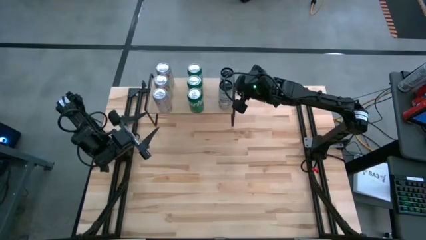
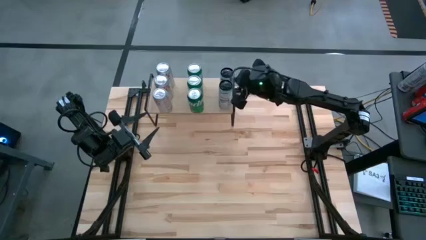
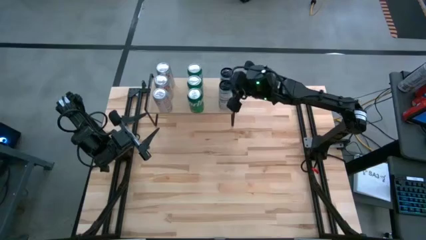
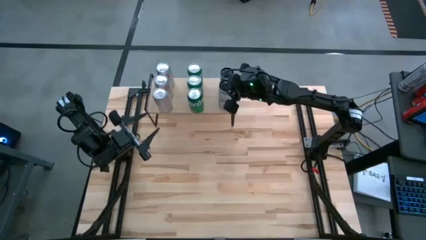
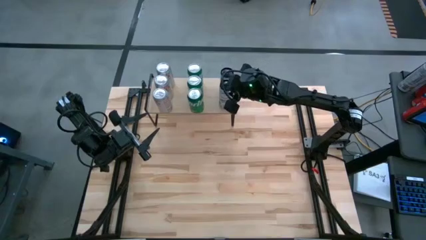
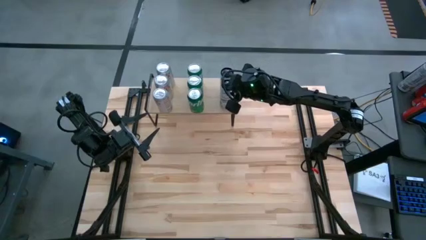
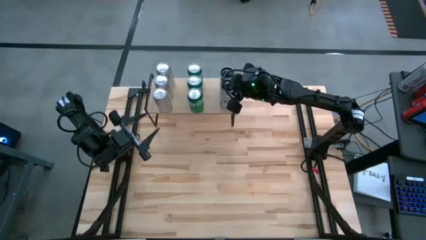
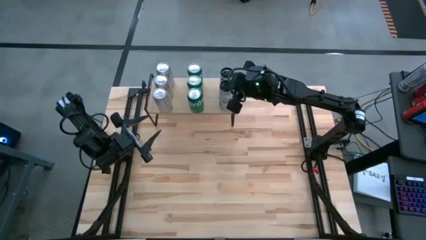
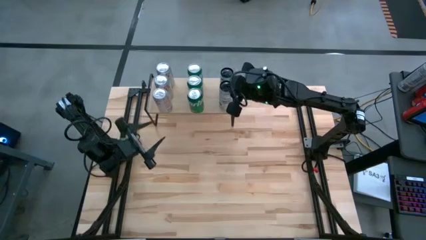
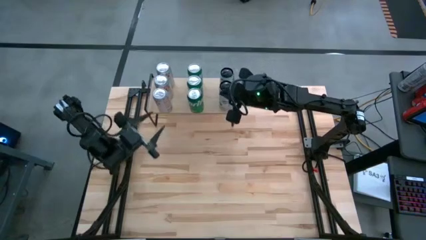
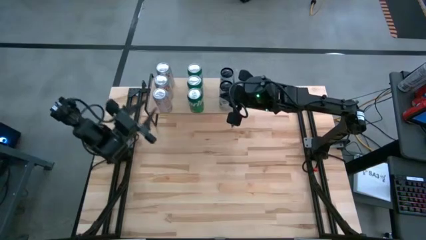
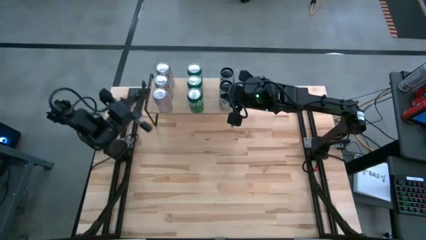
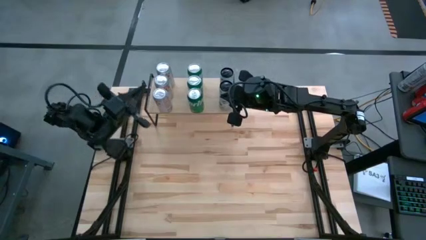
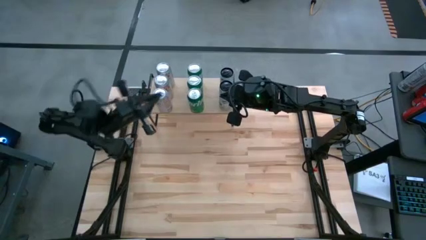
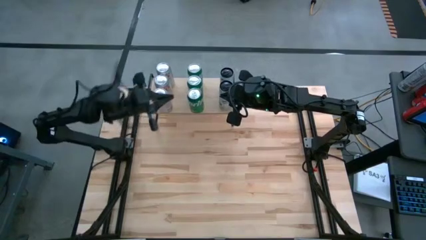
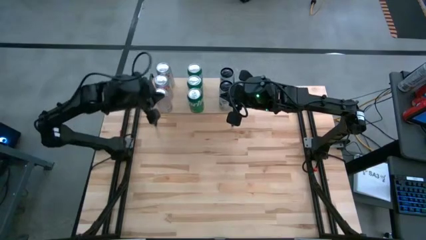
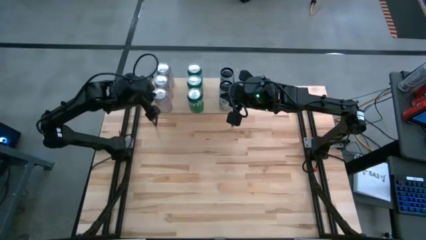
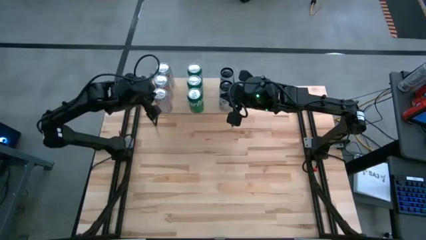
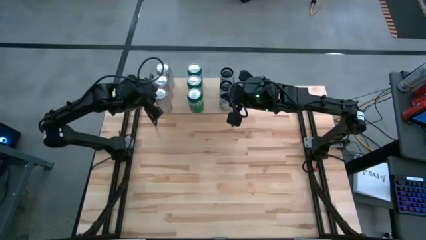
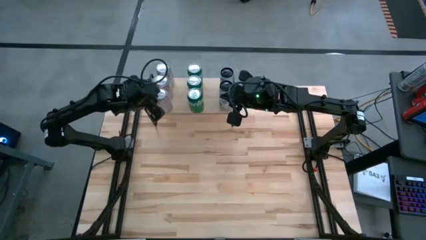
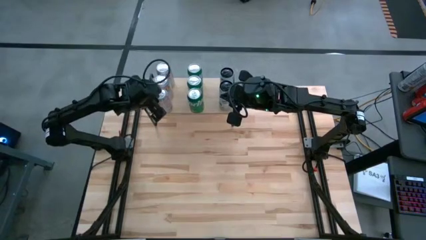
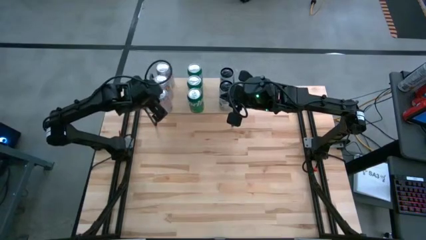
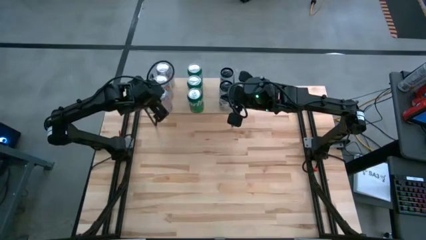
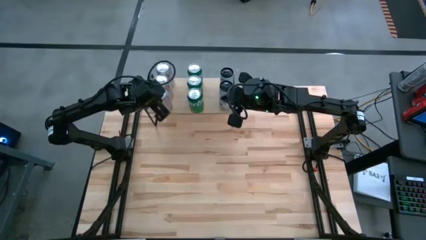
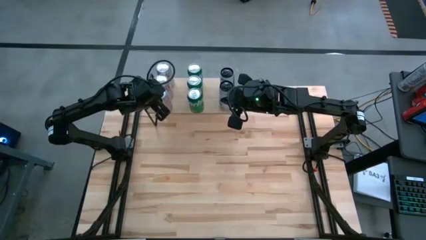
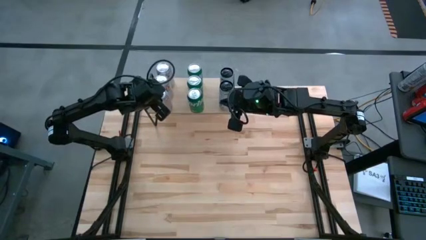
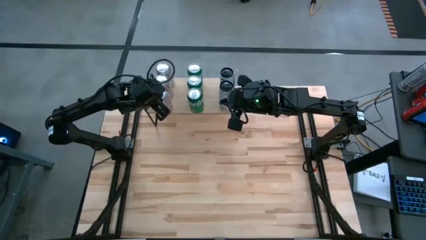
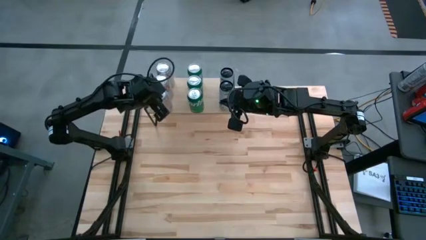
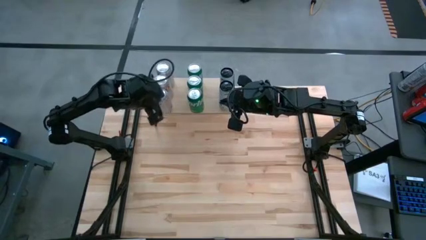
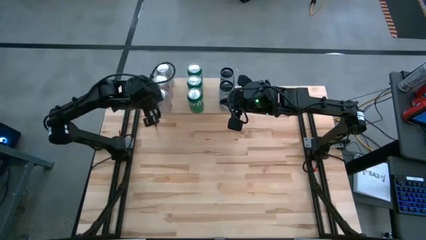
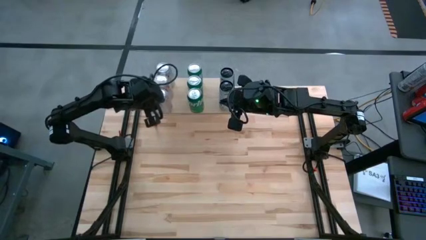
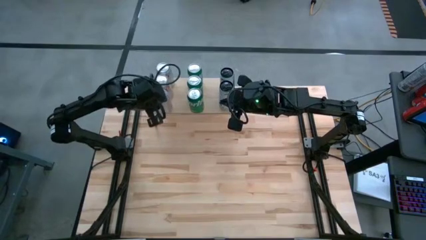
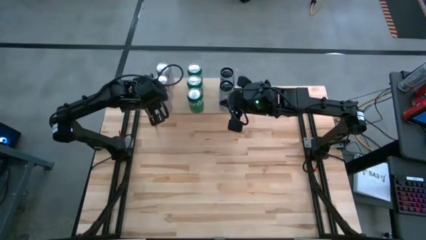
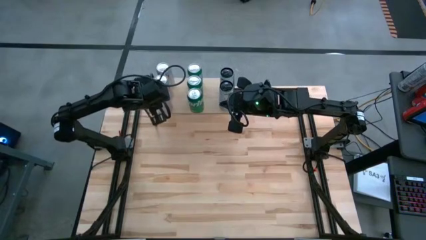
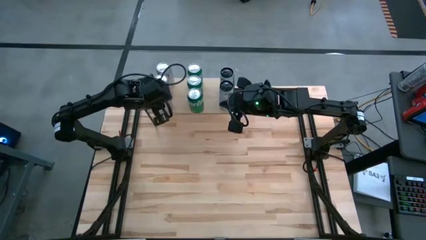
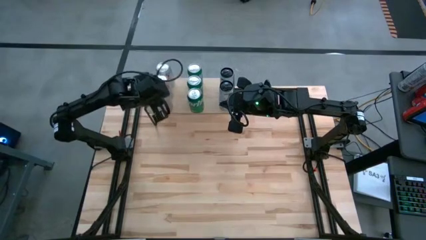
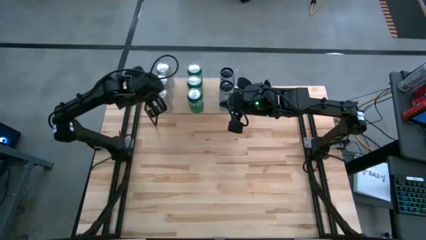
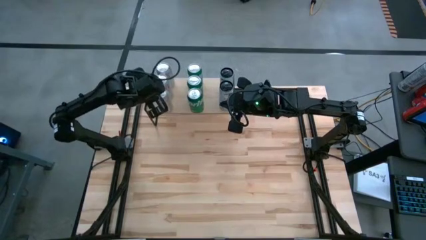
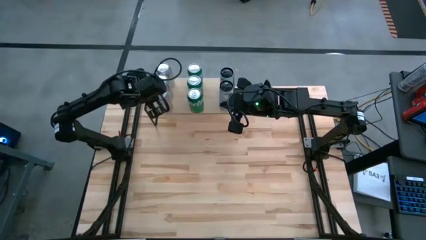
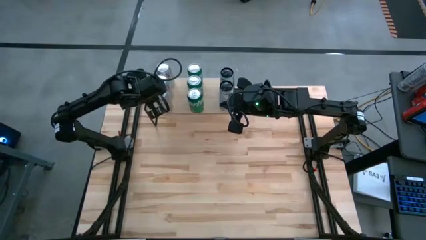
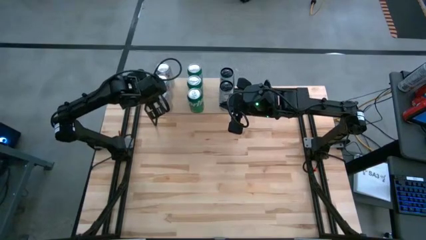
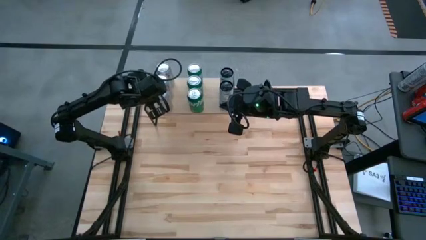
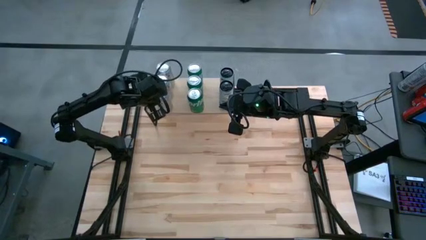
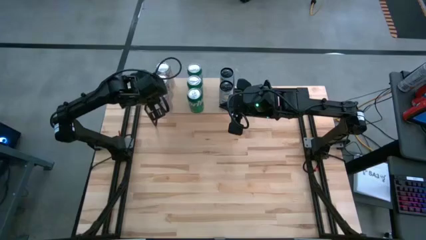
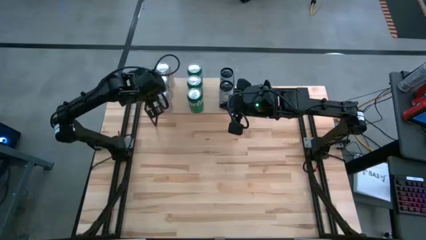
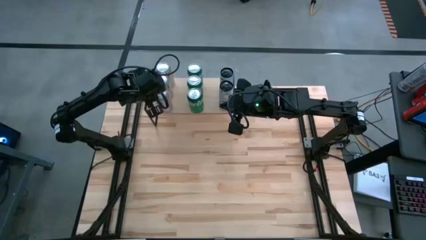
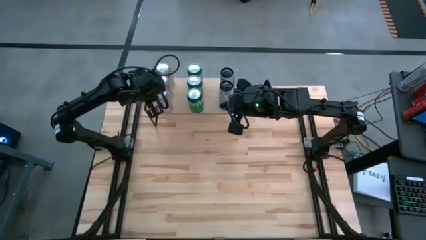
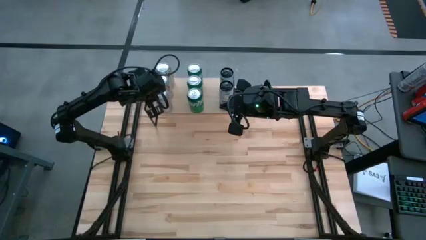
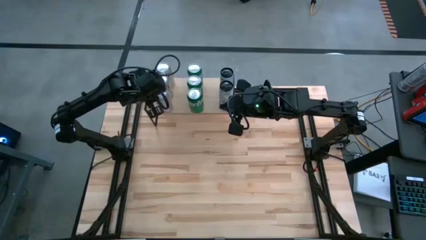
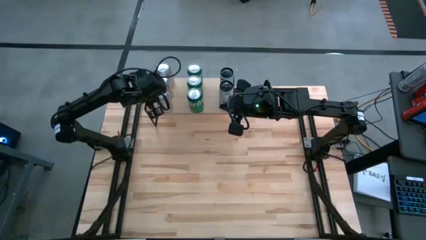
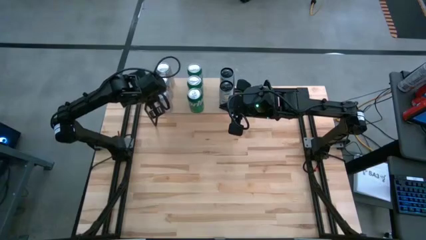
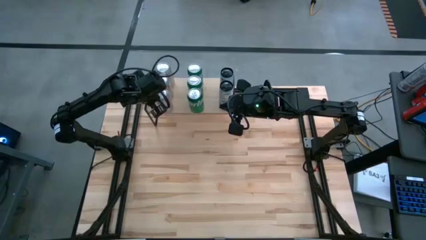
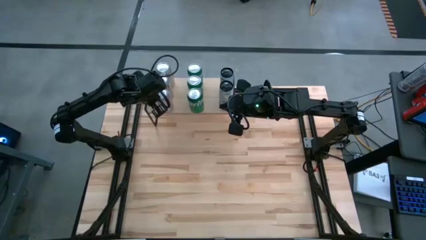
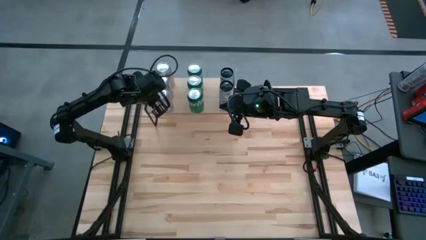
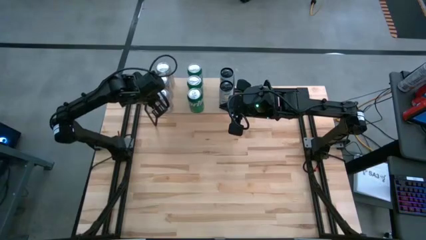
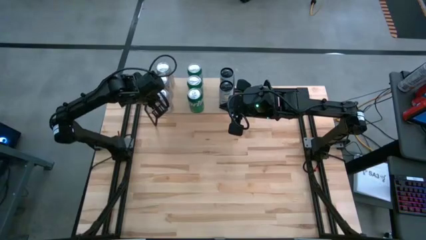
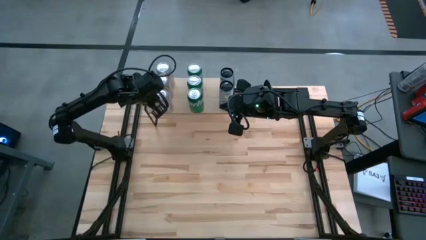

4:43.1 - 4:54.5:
Task: Place canned beverage on shelf
Adjust the soda cans on the shelf

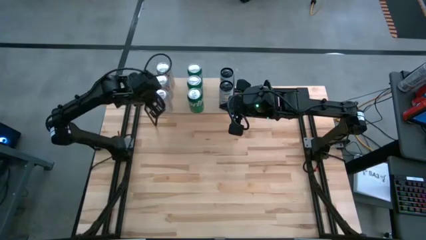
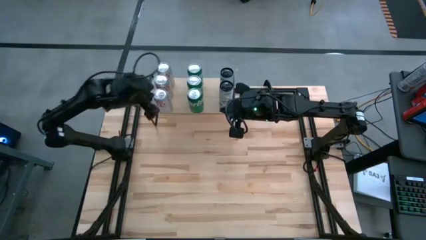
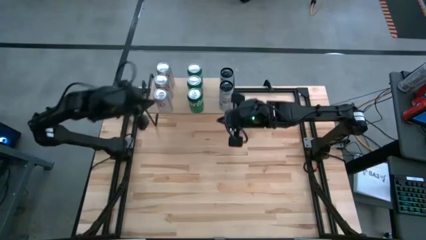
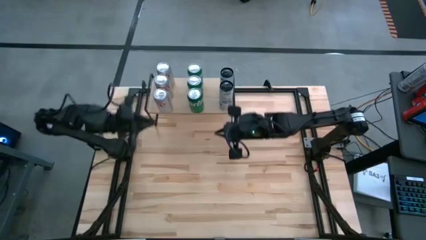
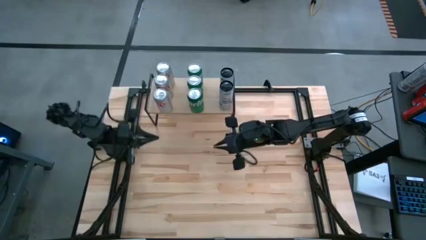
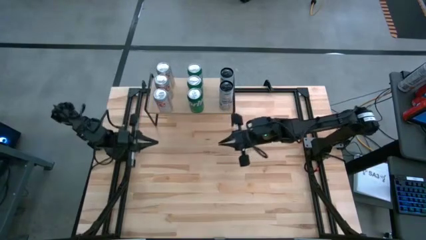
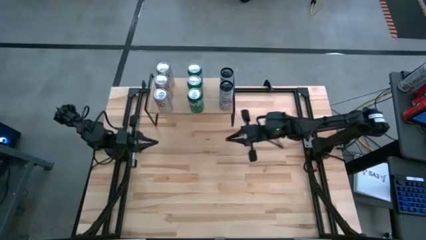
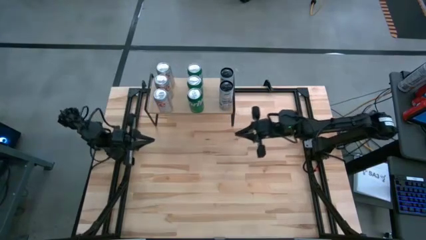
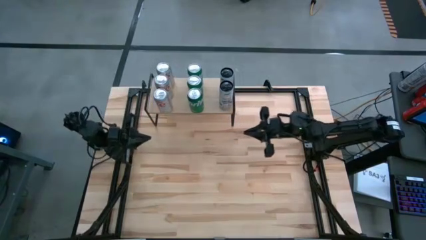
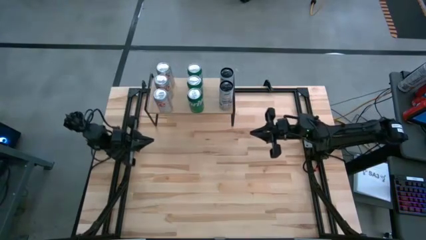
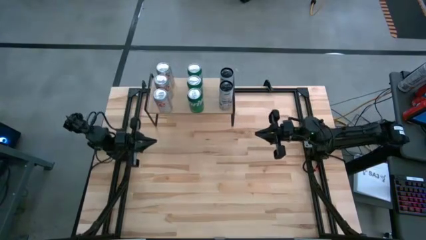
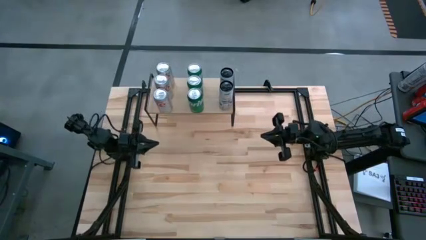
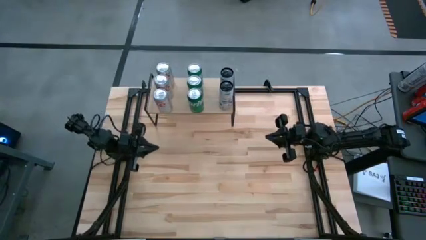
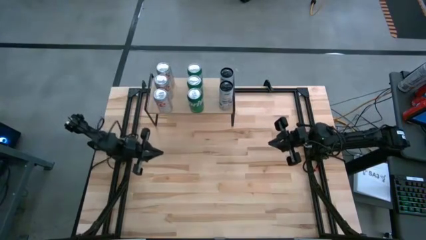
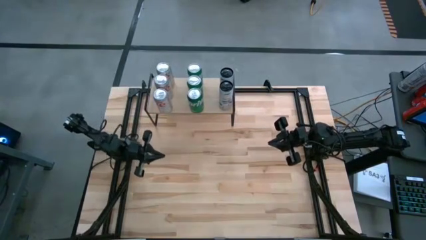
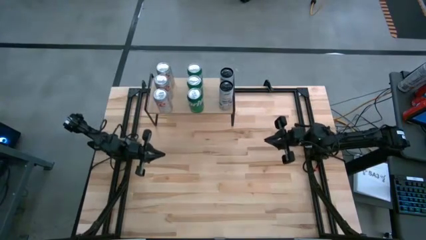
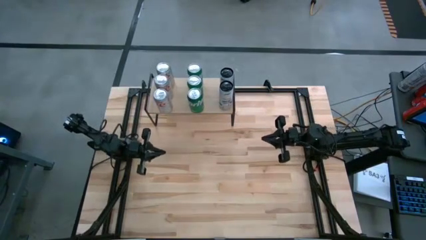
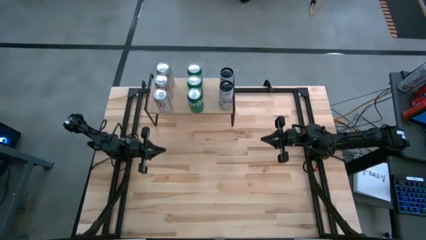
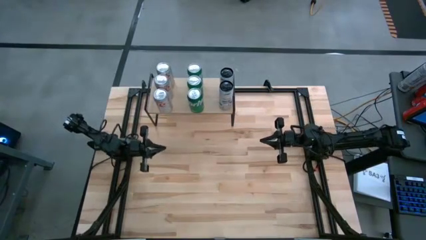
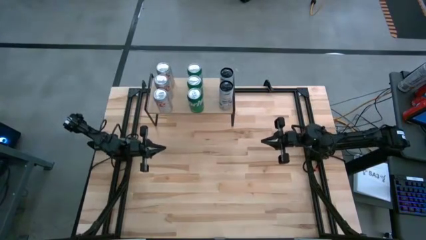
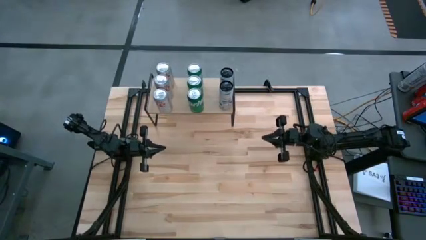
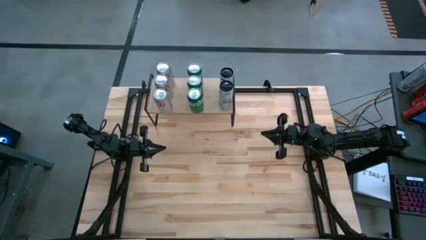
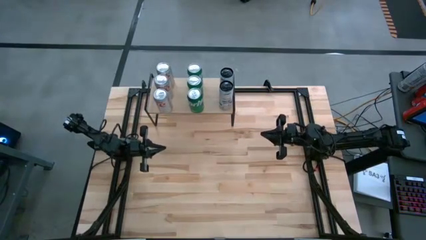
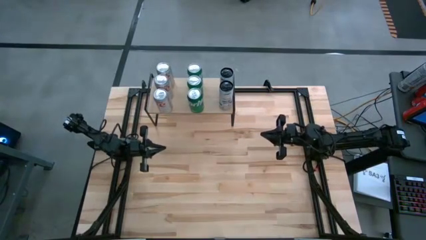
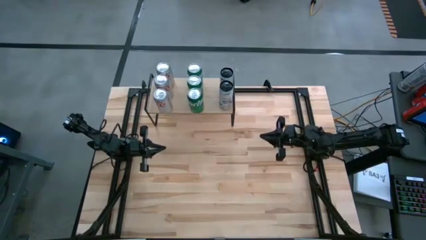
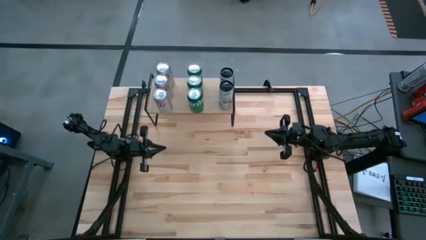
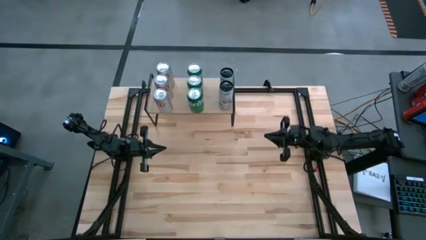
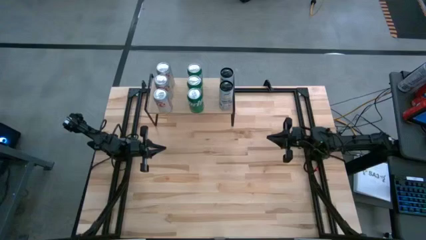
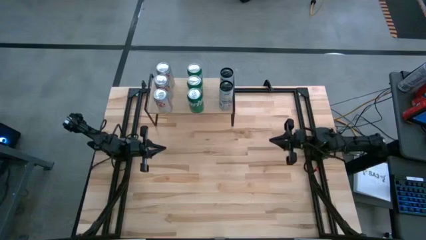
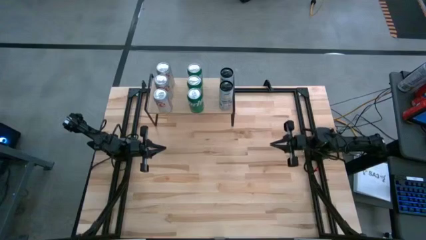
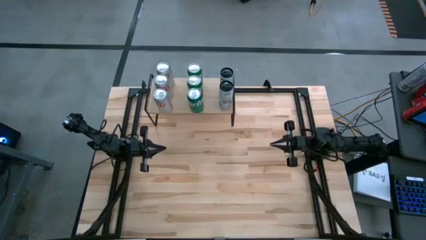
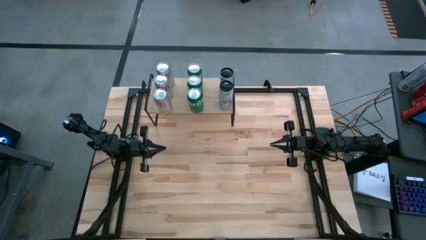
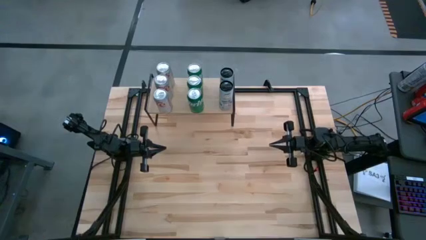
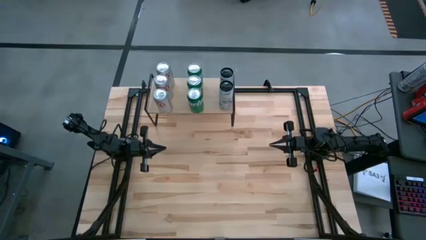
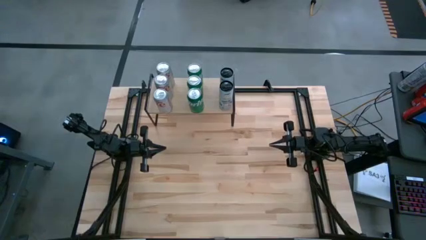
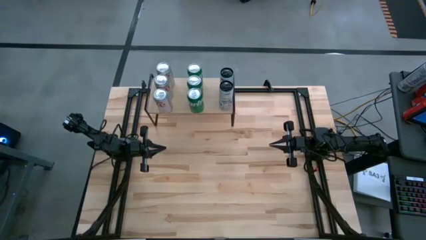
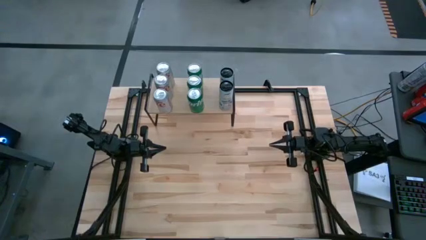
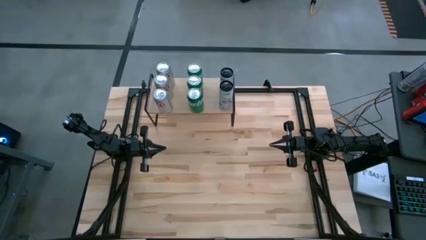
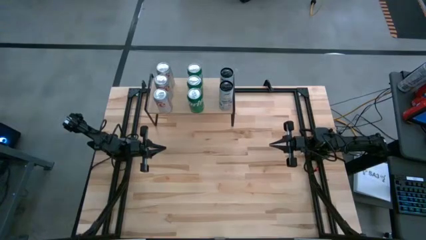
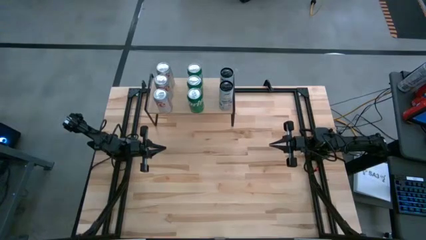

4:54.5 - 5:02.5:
Return to Home Position
